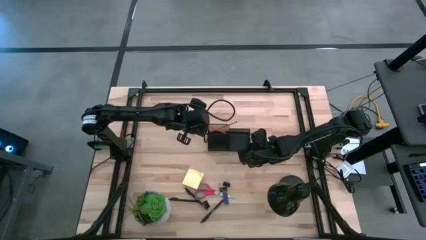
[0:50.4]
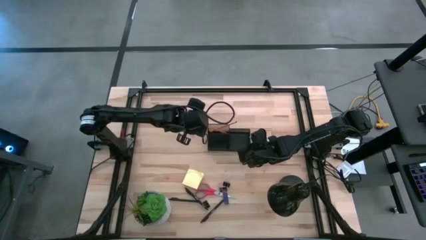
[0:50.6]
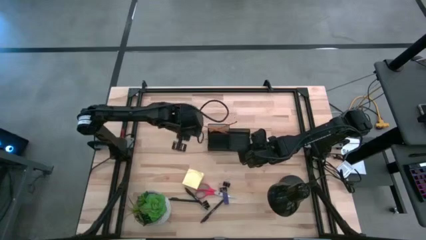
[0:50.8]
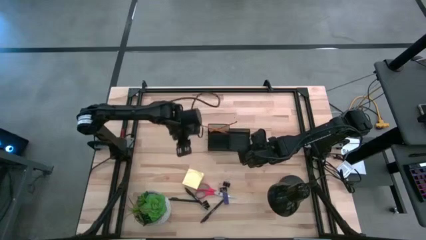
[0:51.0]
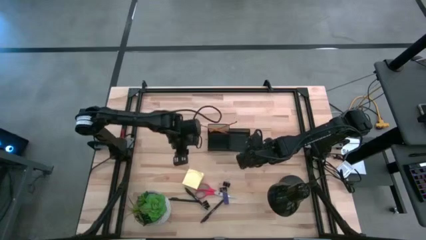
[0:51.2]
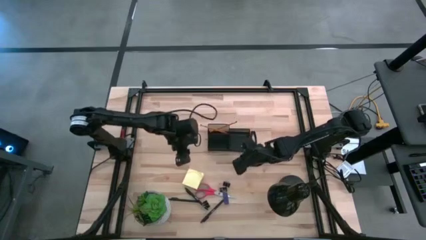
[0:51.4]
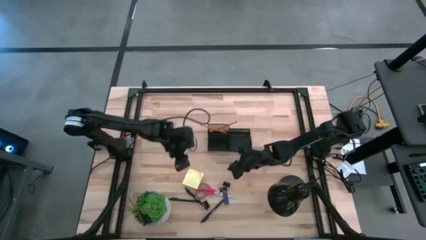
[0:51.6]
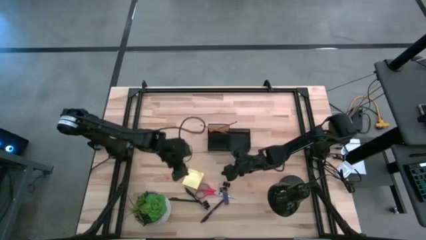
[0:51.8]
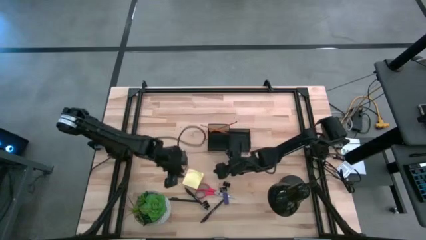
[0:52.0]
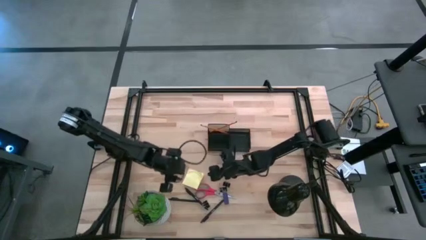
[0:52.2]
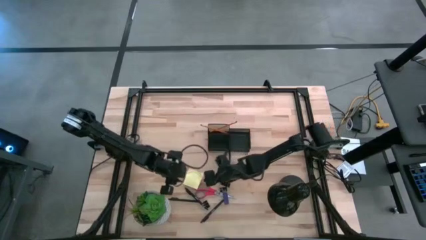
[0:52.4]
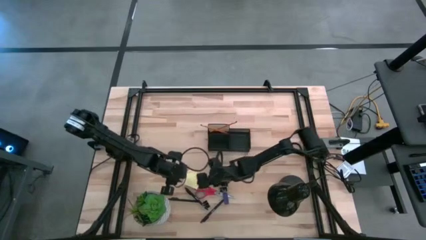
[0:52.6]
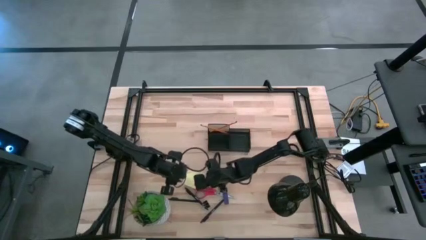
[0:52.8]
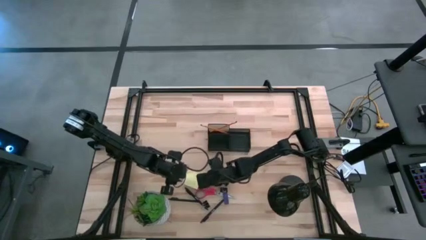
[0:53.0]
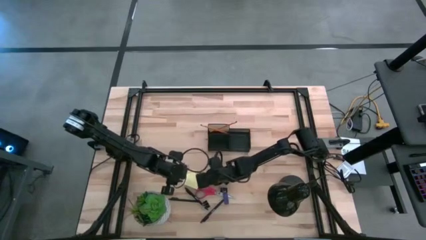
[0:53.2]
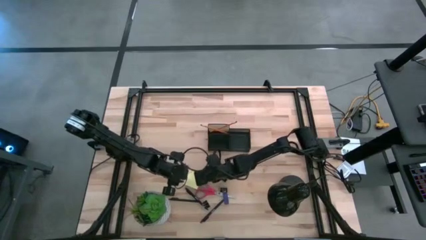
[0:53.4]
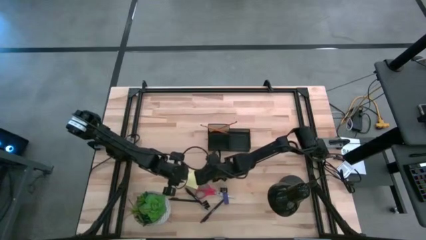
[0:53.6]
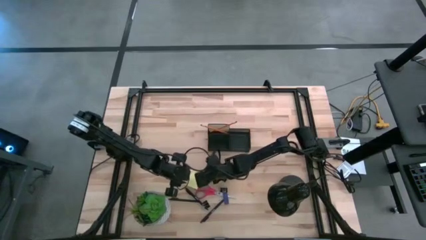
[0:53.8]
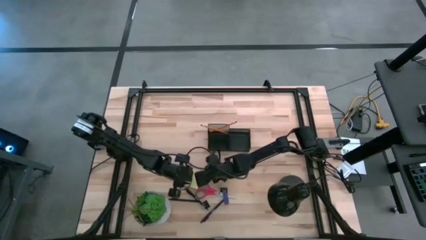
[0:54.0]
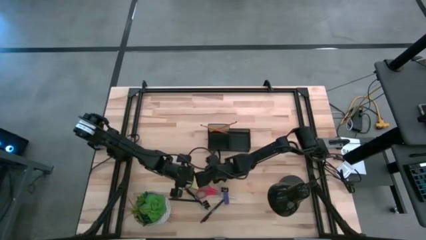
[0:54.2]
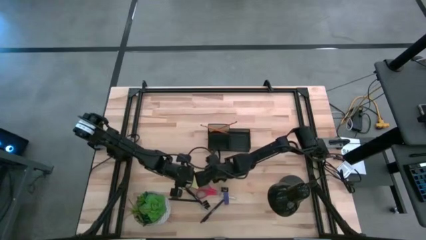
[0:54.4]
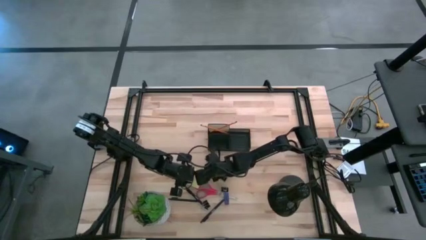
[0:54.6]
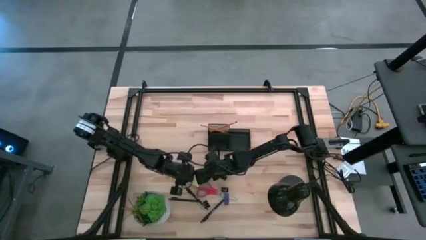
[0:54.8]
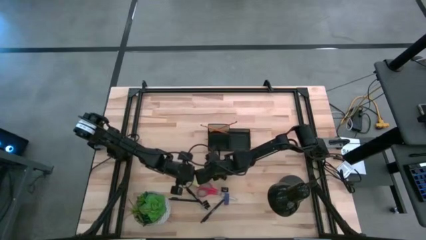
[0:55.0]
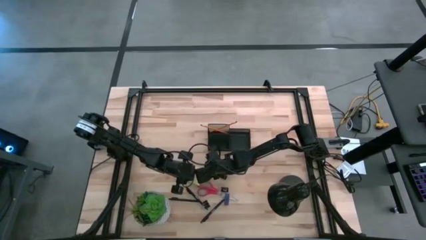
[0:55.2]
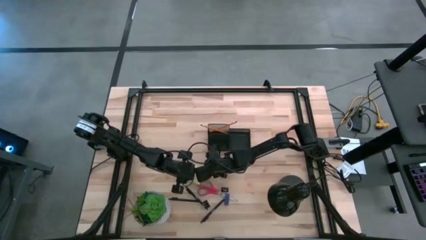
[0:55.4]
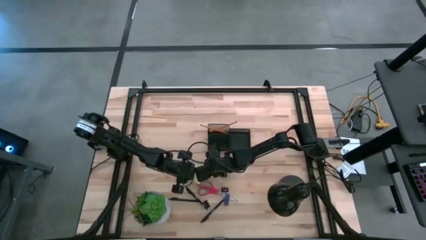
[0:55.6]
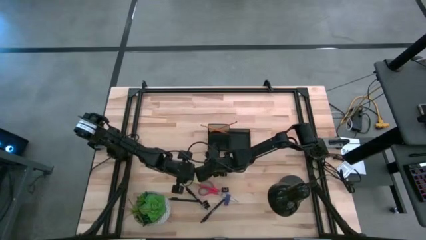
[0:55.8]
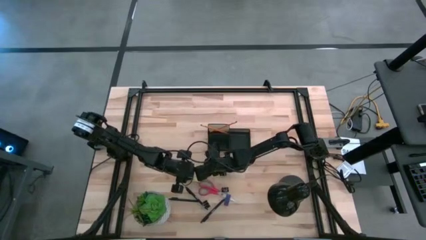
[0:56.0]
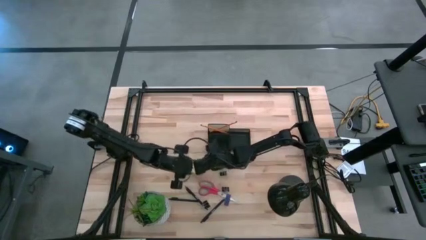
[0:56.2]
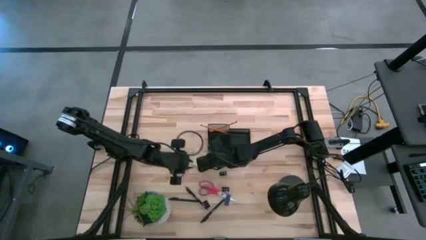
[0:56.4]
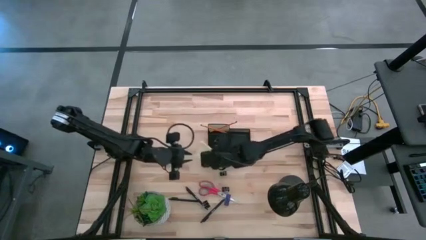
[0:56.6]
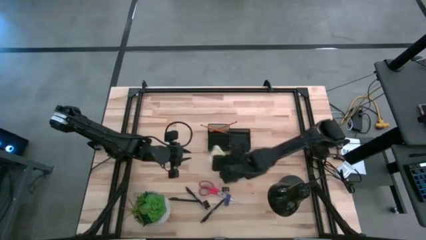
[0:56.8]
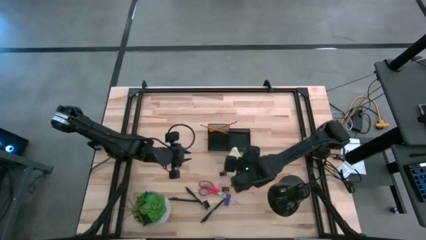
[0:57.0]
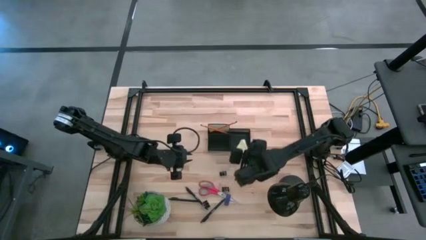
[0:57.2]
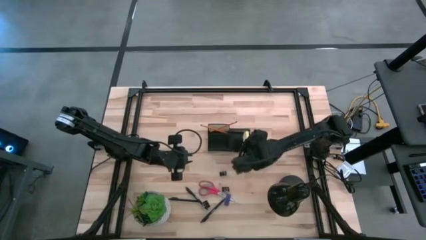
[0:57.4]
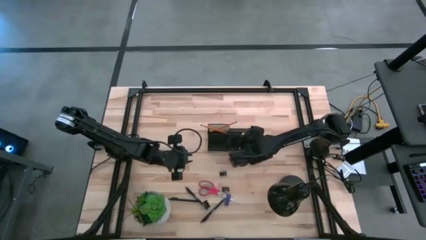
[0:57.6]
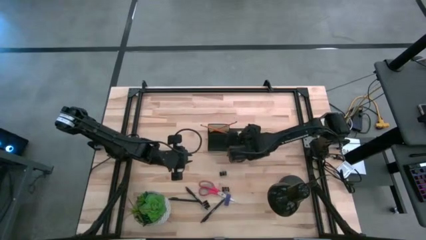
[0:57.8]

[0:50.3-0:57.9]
Task: Pick and place office supplies into organizer
Put the yellow sticky note into the desk organizer

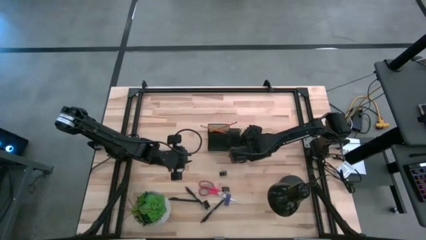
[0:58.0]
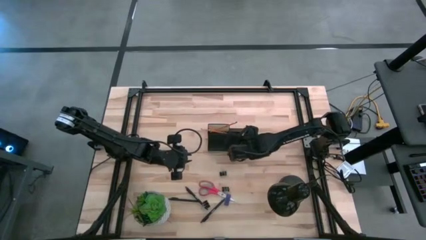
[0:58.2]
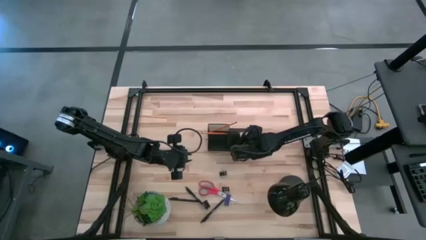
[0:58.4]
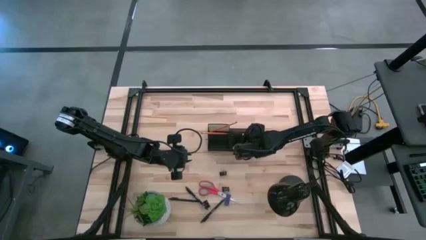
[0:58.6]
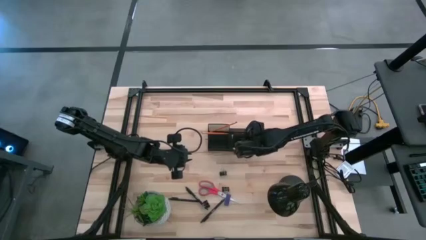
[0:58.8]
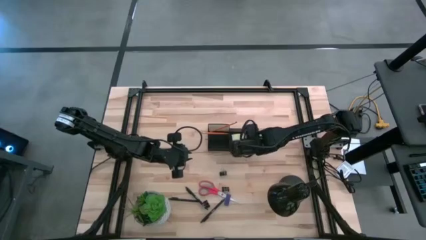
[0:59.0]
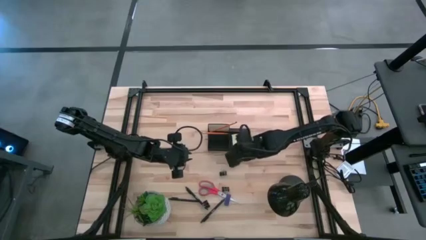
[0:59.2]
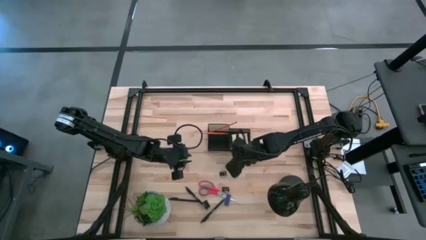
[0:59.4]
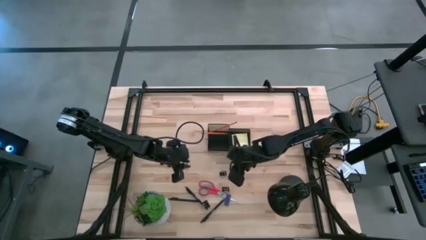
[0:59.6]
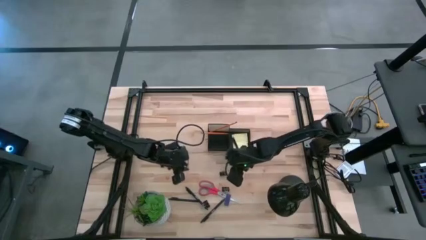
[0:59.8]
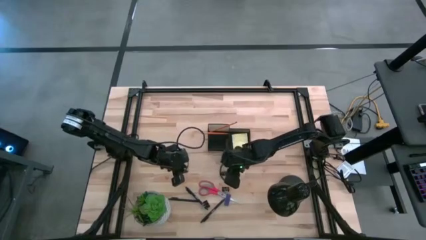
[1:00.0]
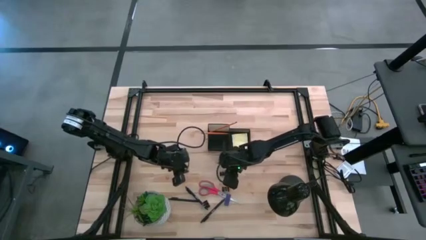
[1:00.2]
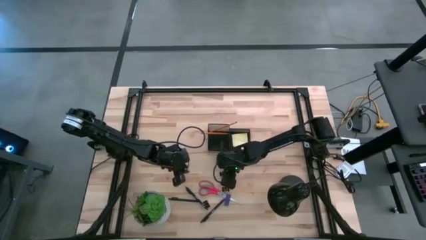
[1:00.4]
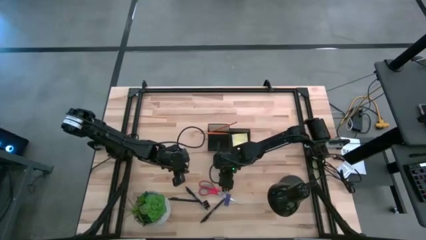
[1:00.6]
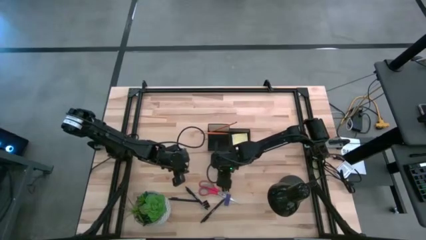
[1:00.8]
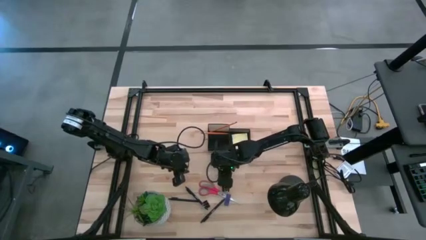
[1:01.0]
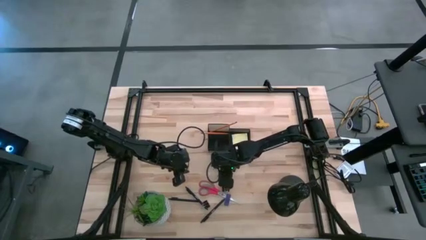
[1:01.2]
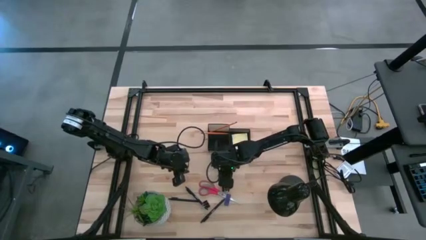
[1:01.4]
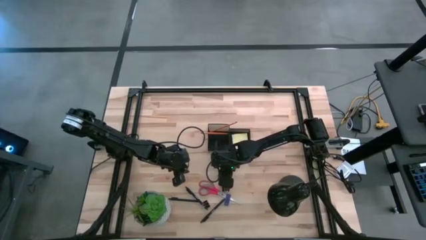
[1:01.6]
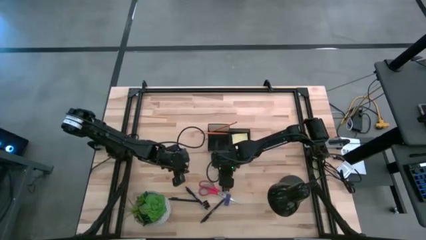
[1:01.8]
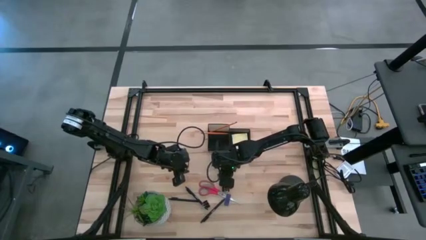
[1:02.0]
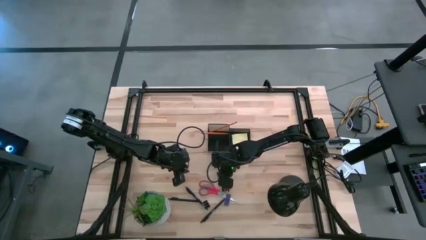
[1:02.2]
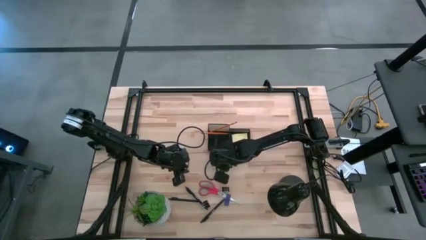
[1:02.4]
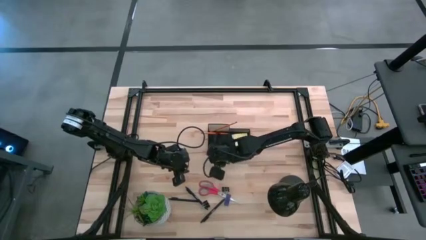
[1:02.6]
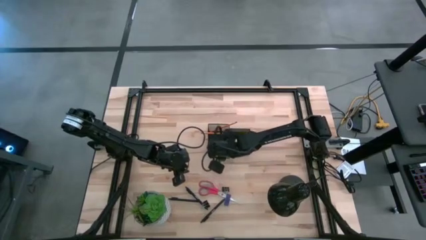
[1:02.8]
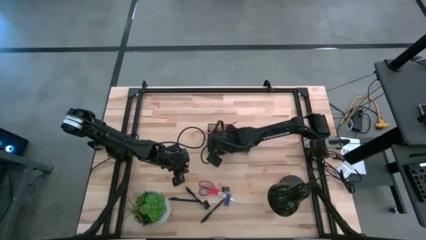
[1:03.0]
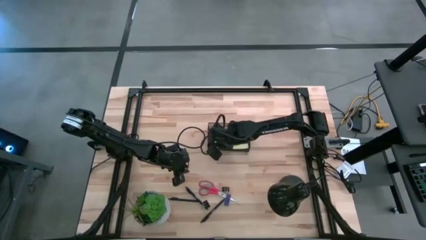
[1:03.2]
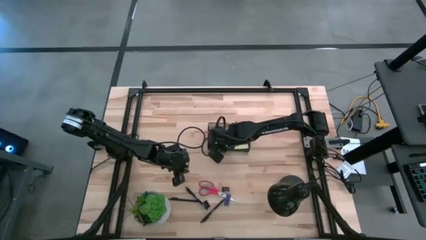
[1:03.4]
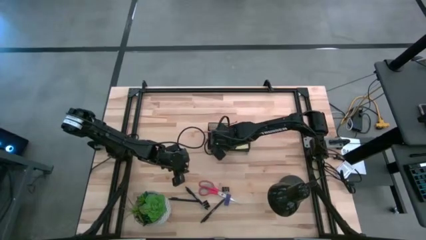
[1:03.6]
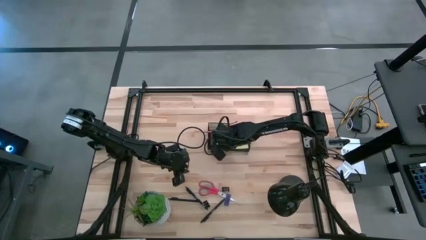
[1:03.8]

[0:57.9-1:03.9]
Put the top black binder clip into the desk organizer

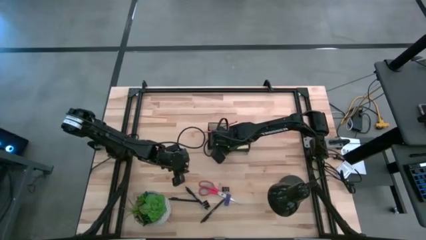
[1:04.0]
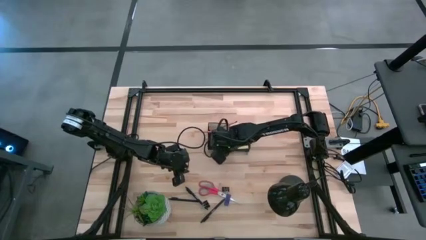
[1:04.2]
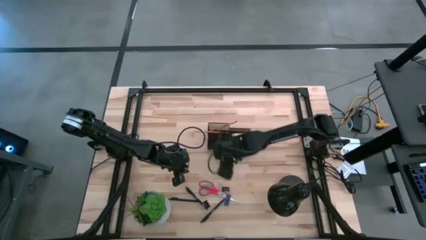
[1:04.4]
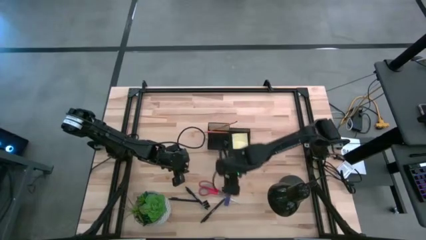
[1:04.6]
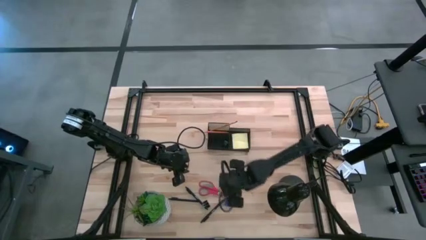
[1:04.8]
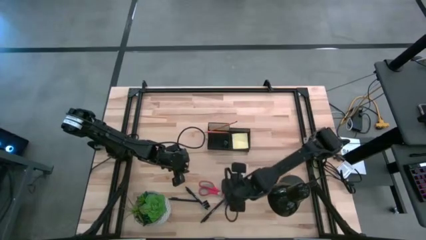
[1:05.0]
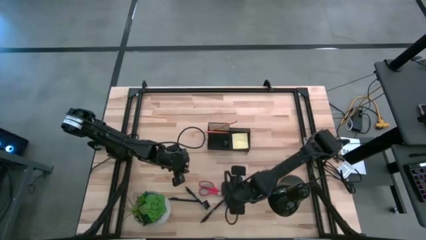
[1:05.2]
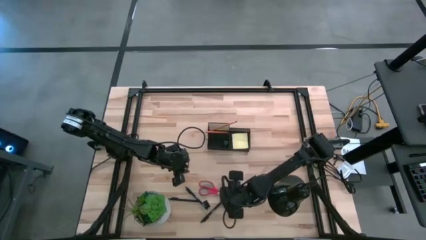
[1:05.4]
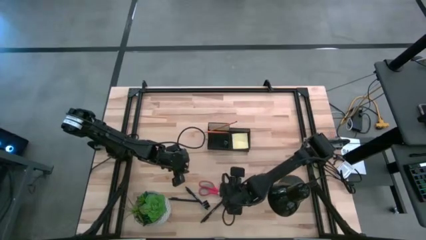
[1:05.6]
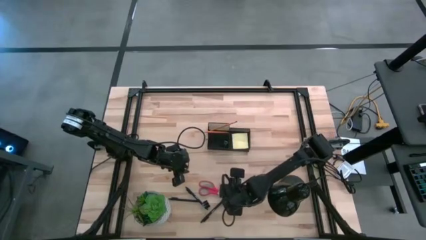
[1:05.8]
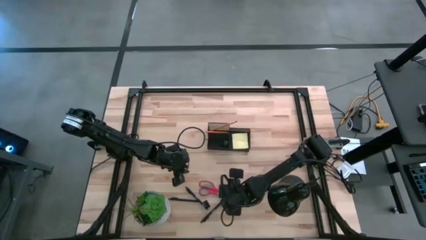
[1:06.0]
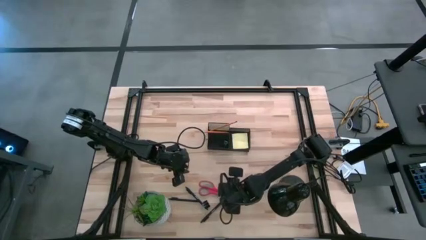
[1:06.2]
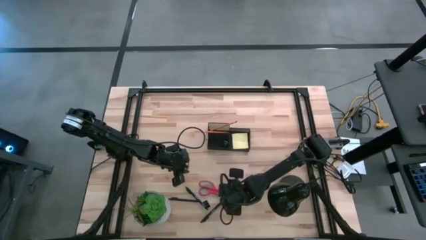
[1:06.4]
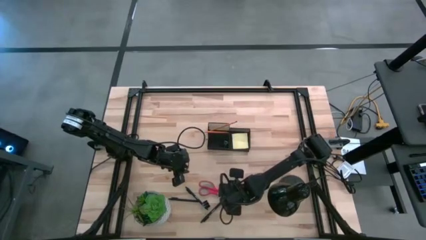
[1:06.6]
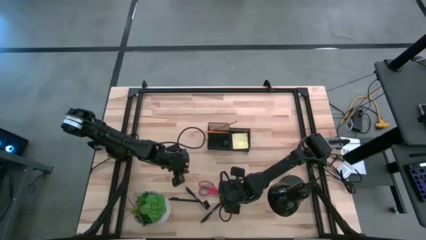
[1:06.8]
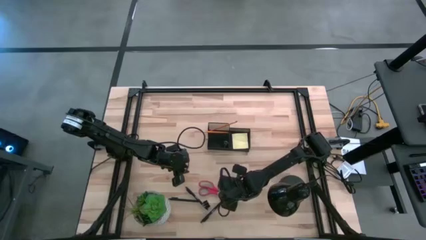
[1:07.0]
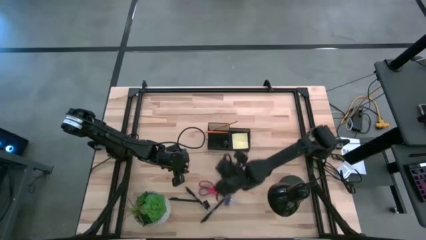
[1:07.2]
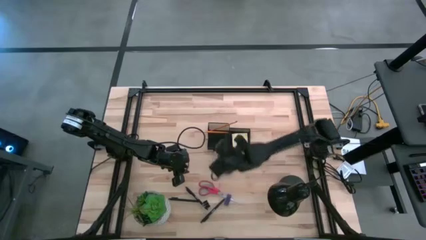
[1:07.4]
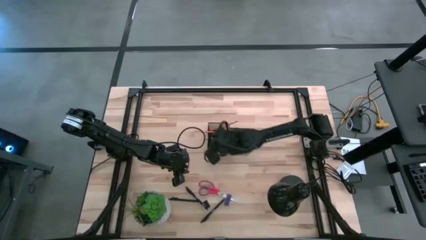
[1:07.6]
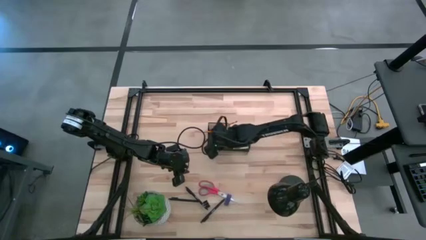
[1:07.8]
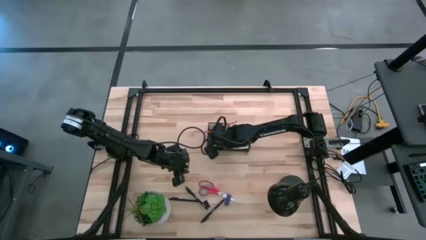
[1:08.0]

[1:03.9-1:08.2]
Put the top black binder clip into the desk organizer
